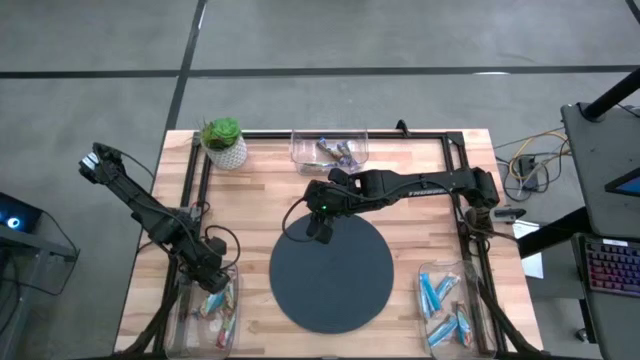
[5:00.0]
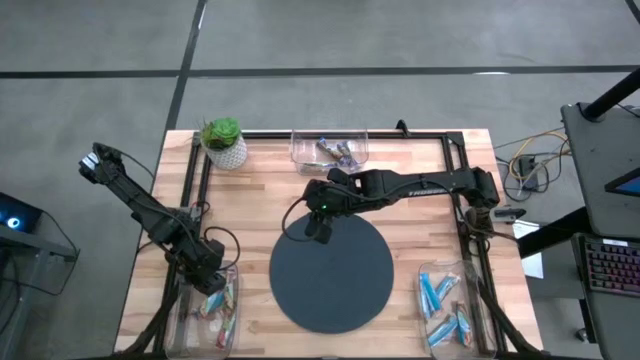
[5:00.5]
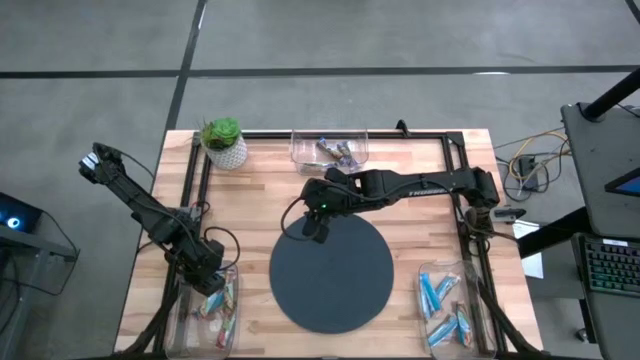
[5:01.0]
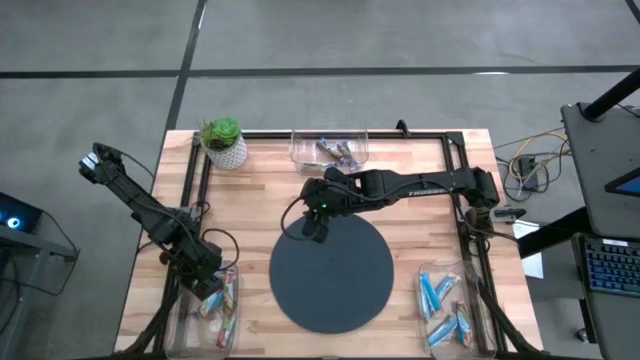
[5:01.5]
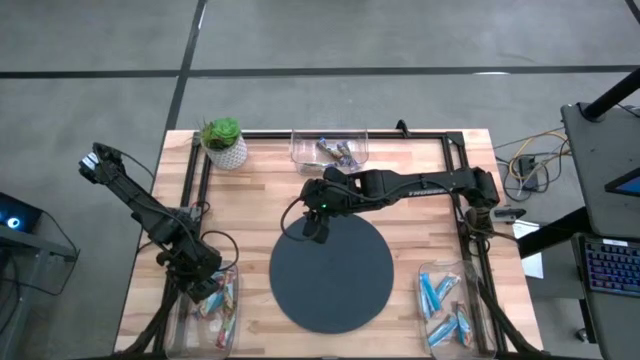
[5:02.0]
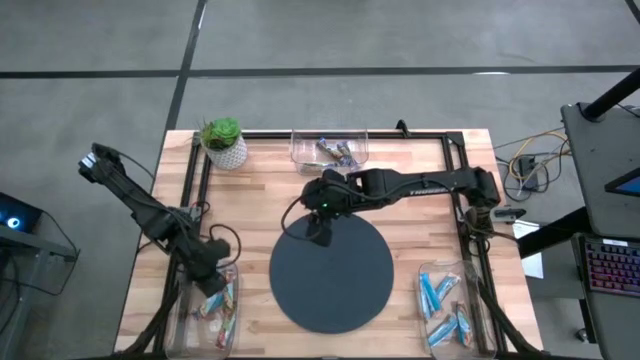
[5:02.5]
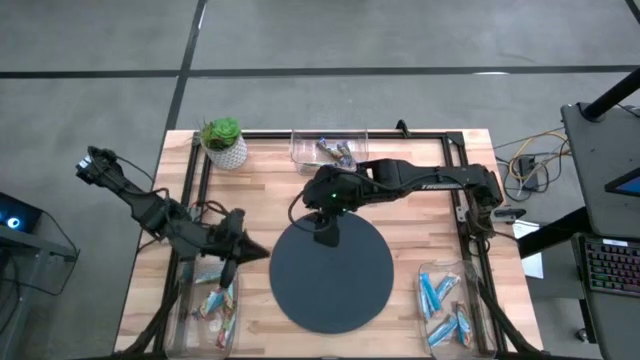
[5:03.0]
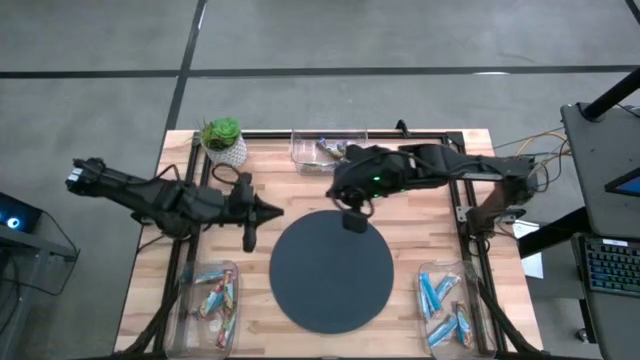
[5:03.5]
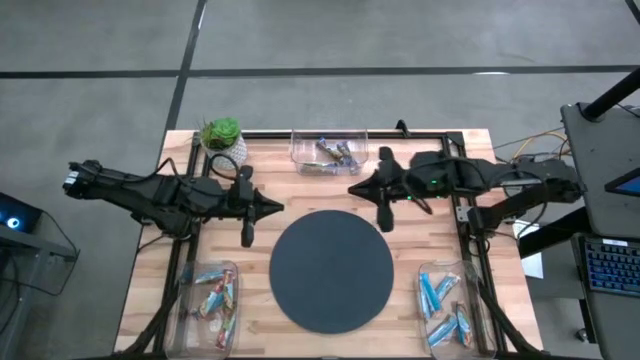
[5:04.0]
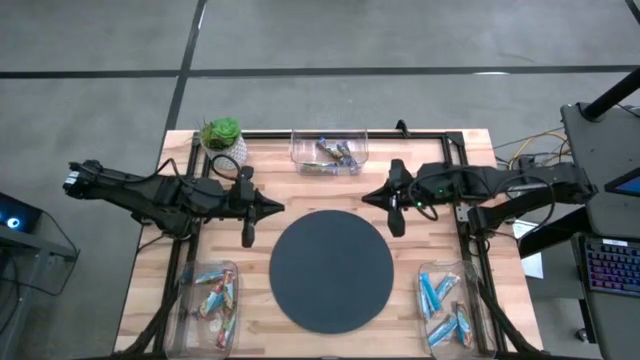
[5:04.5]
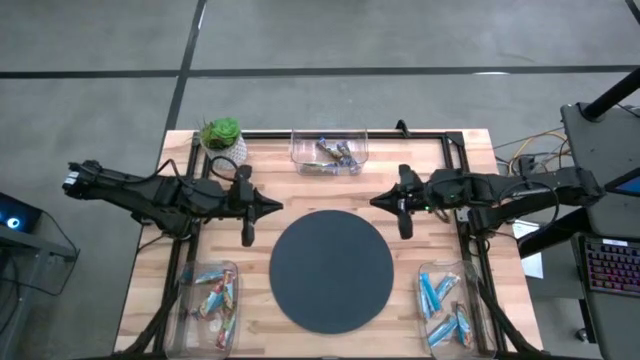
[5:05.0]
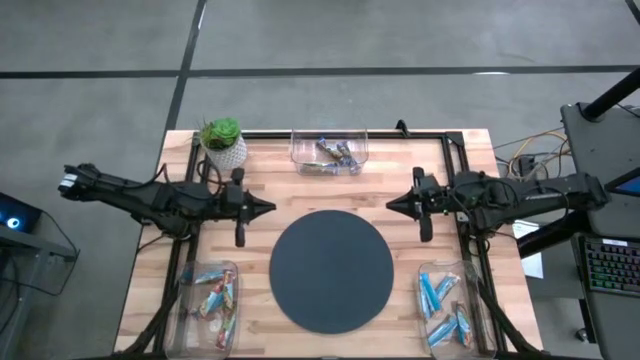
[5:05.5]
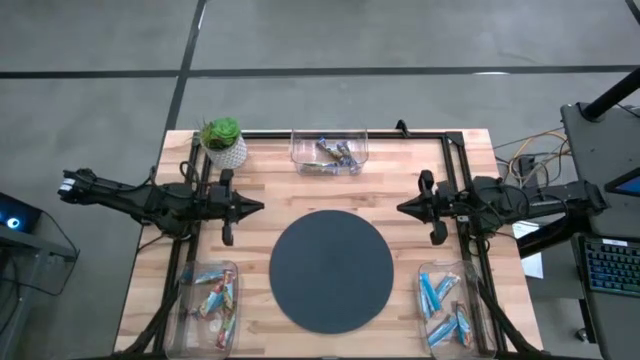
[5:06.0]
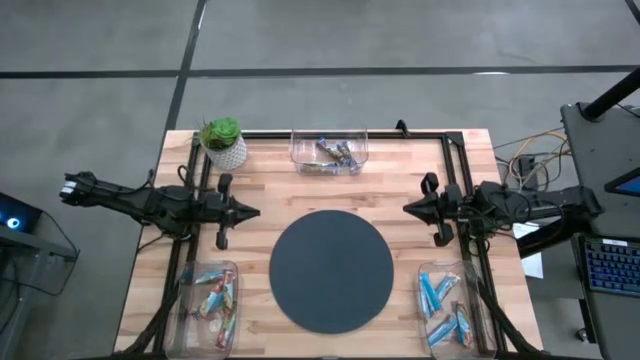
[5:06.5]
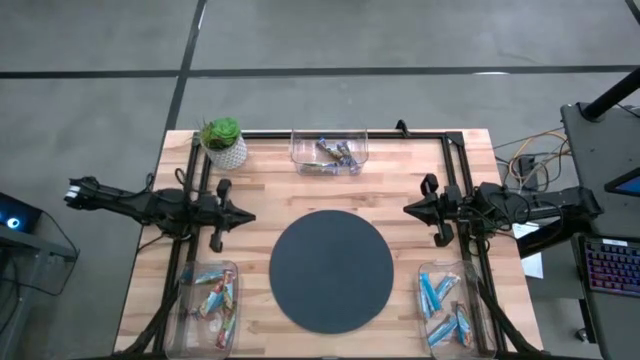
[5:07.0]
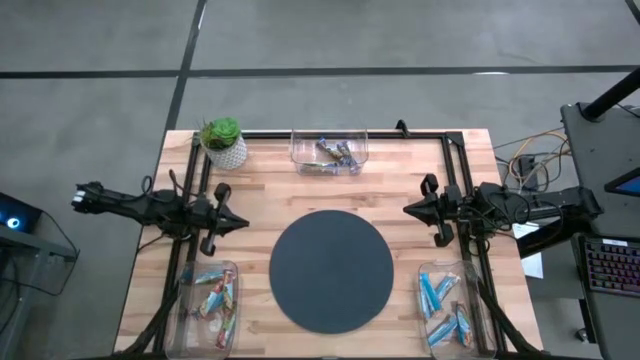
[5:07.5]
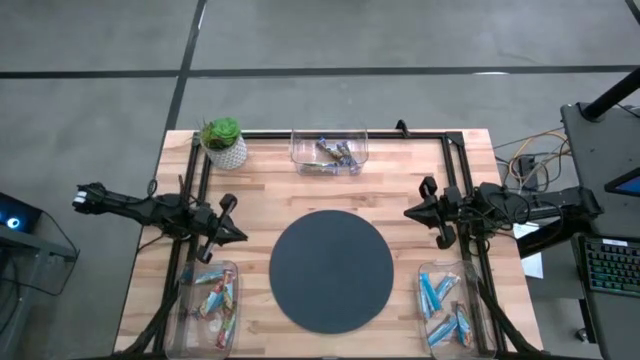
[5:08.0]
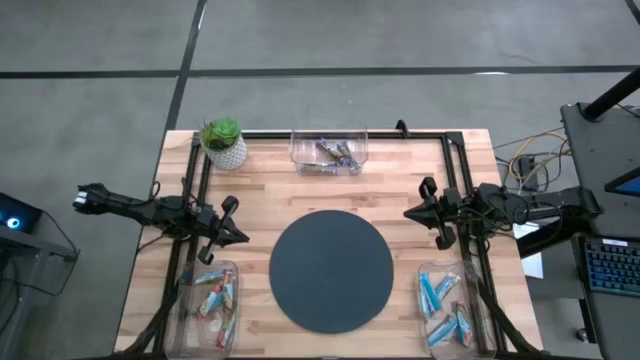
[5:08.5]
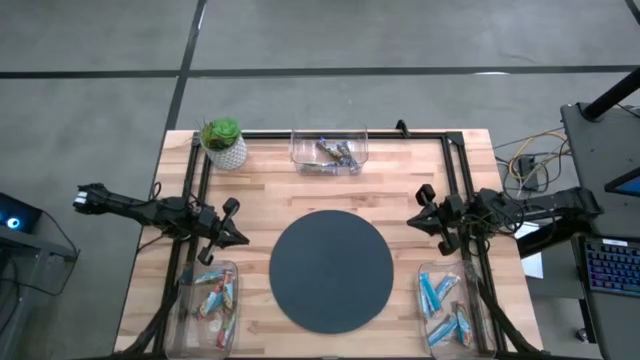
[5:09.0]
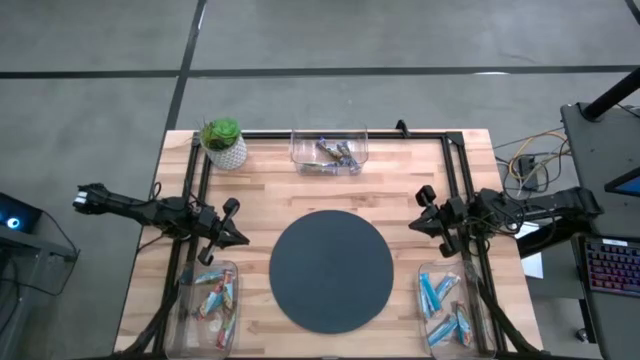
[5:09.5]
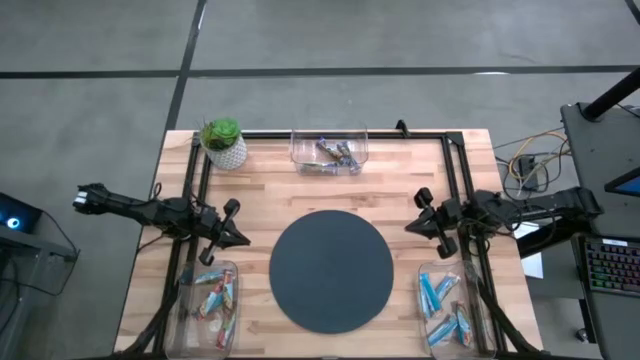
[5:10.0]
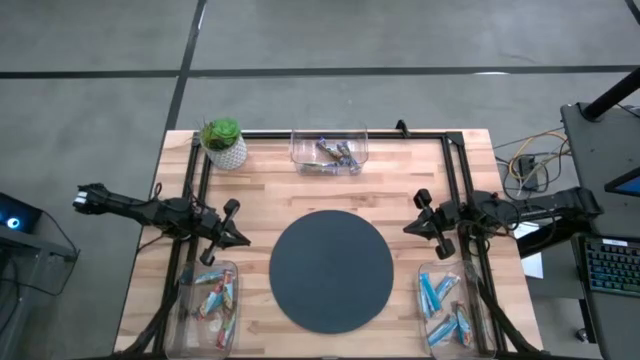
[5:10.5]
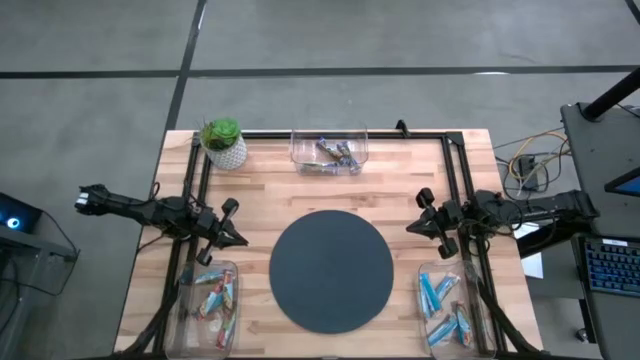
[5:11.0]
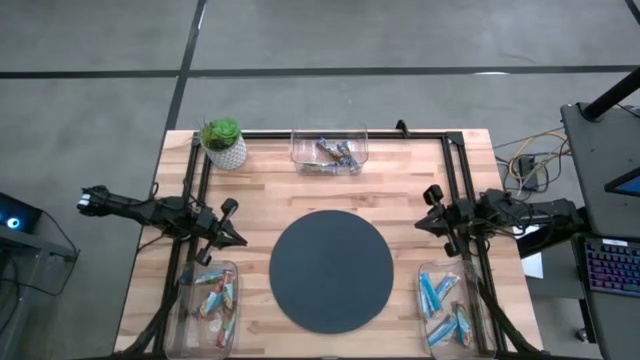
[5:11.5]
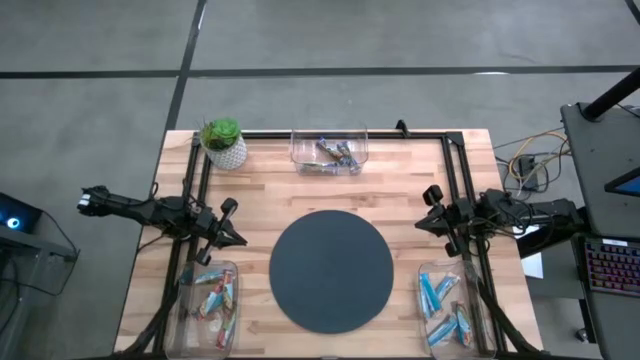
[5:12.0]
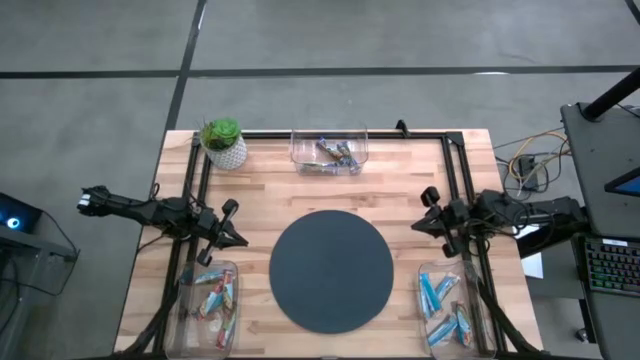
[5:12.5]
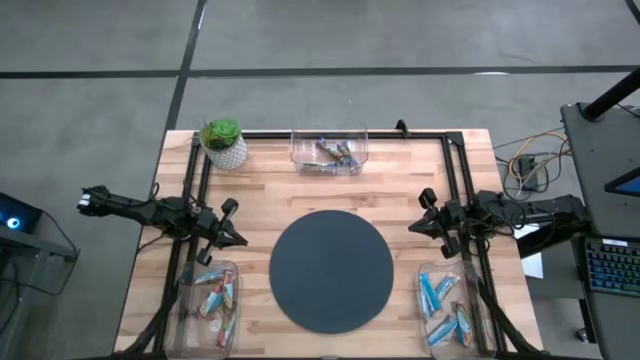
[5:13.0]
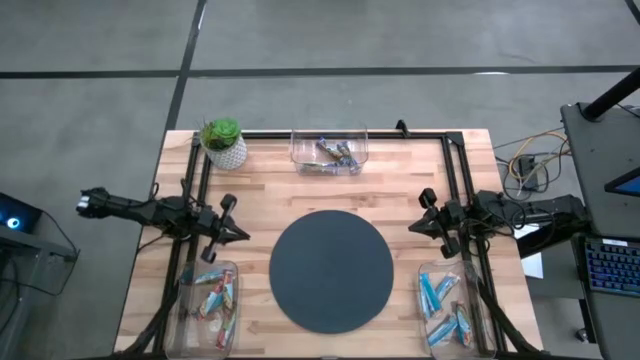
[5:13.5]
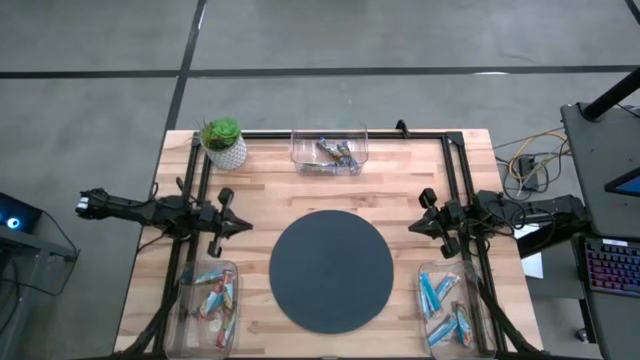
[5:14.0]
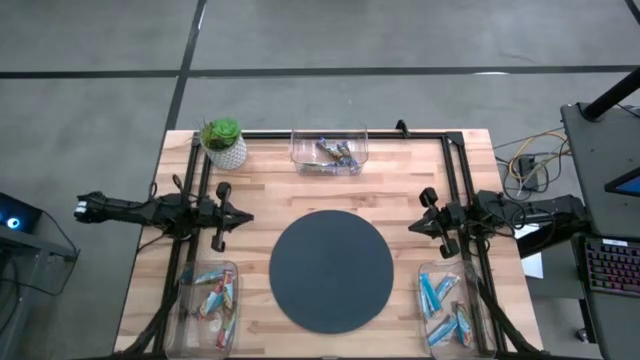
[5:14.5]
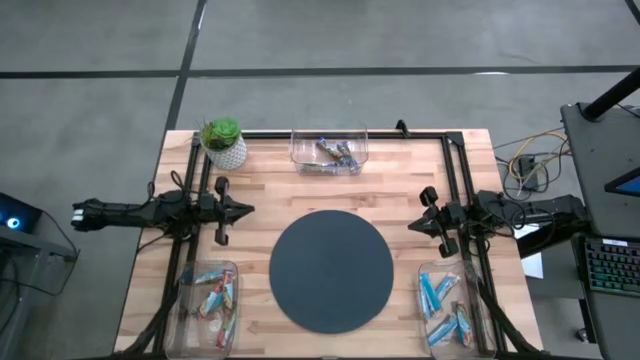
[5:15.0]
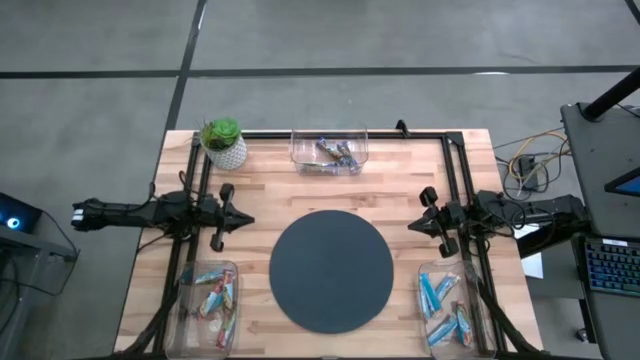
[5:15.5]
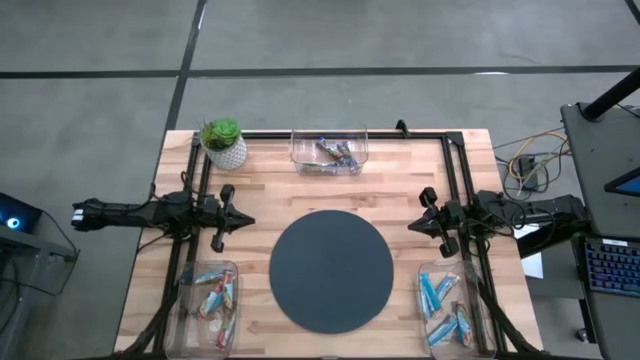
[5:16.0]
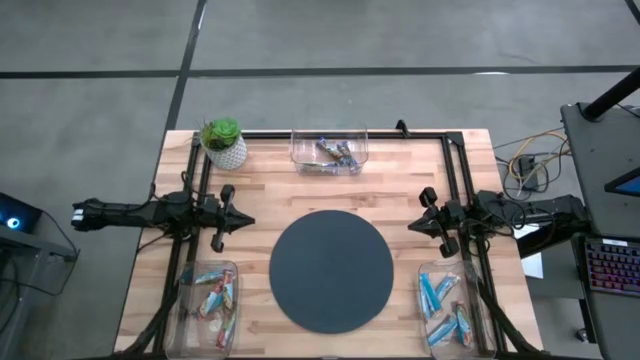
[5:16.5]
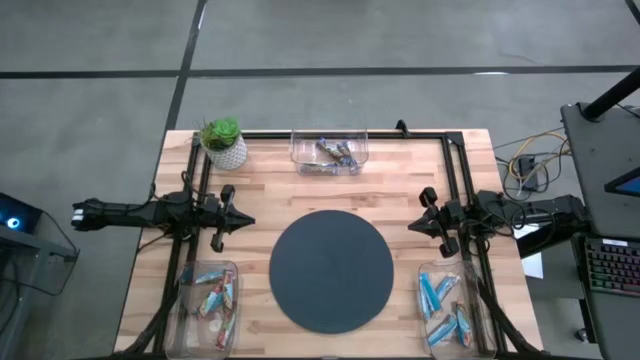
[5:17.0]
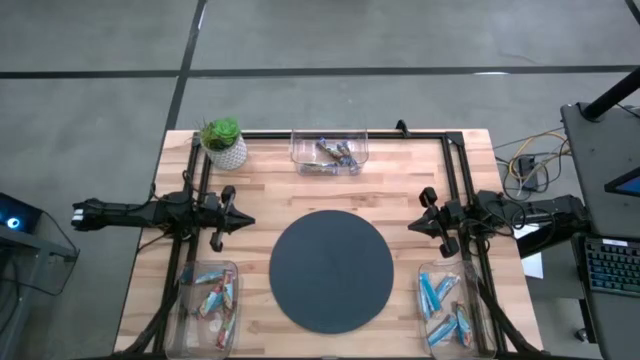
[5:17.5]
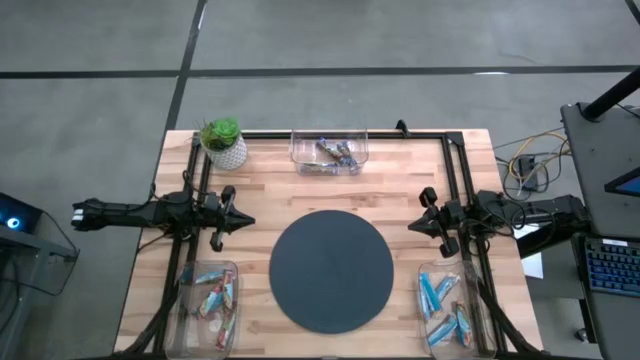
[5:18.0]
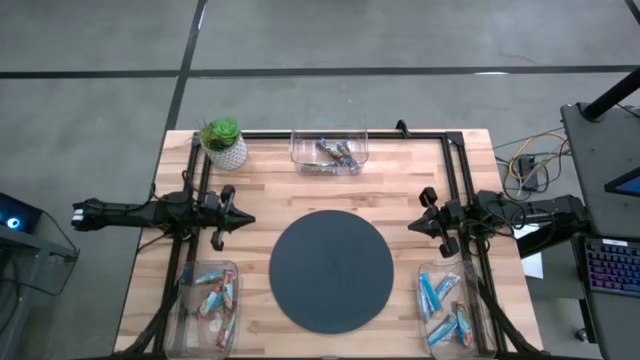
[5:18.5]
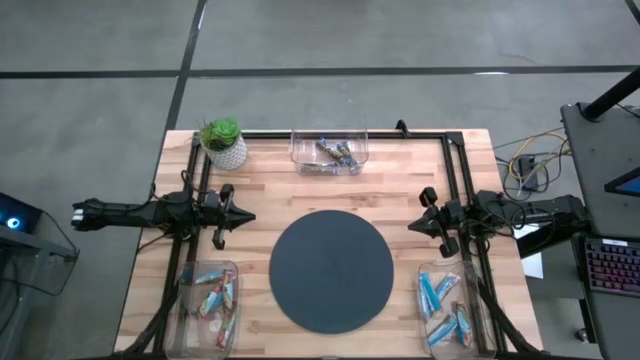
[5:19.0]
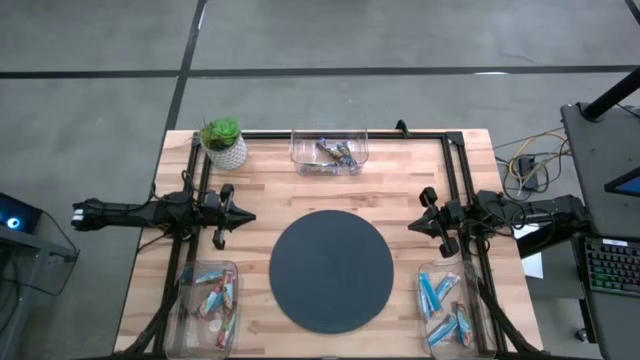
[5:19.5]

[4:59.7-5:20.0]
Task: Pick and place Granola Bars by type
Return to Home Position

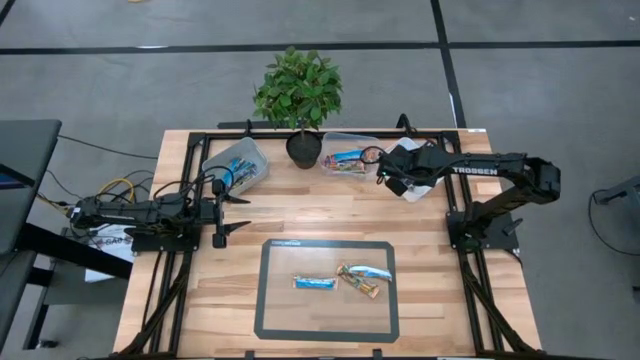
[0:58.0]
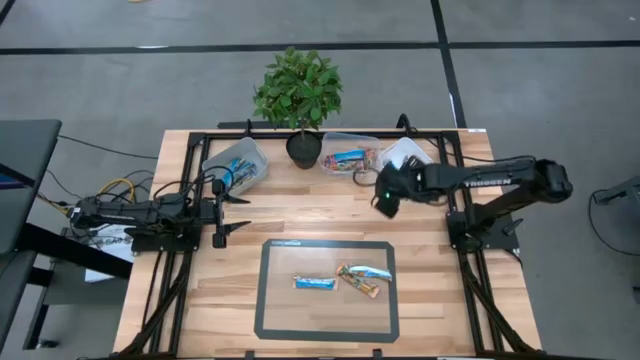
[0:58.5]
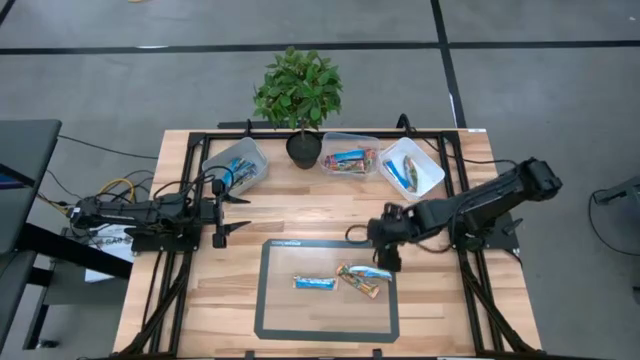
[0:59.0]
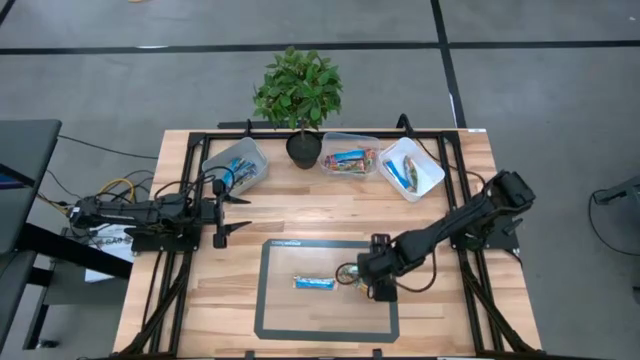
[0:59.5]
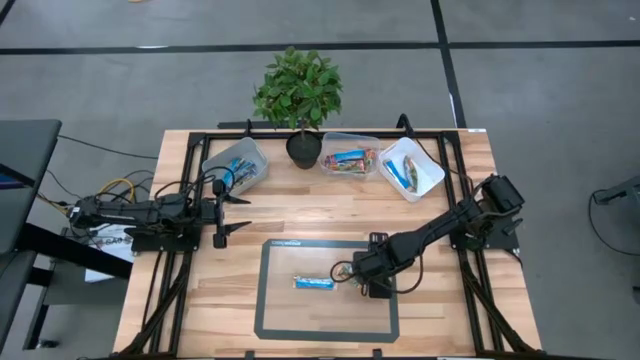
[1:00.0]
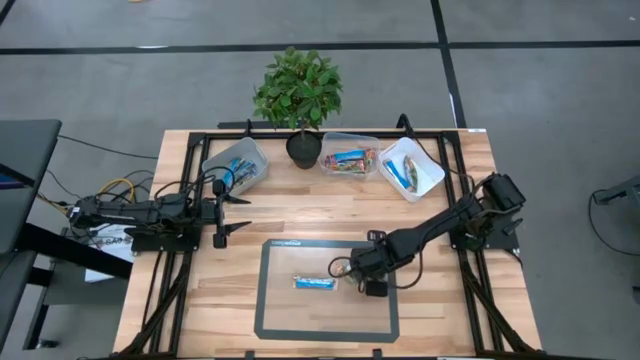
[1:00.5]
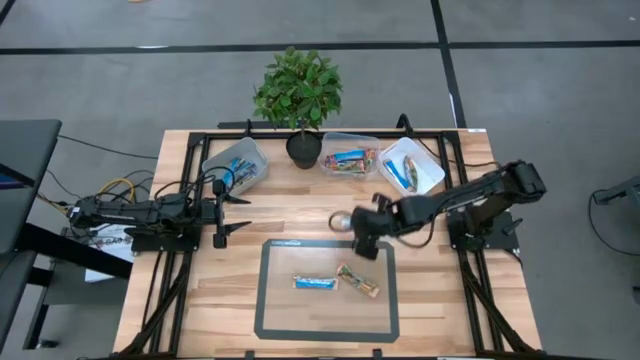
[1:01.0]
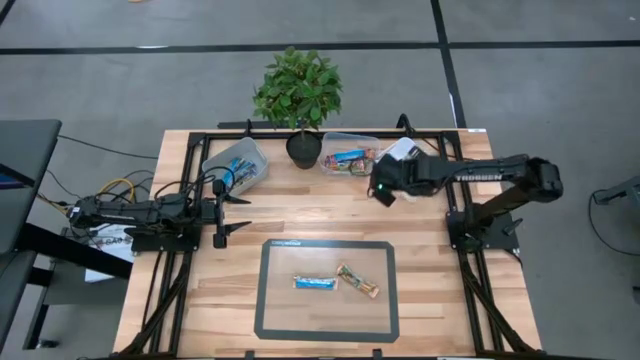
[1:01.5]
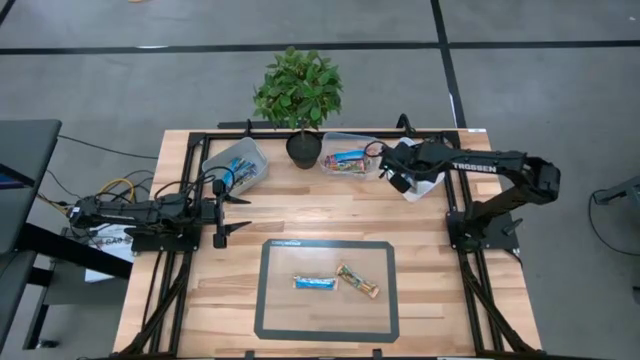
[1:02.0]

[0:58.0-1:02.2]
Task: Pick and place Granola Bars by type
Put the yellow granola bar into the white bin
